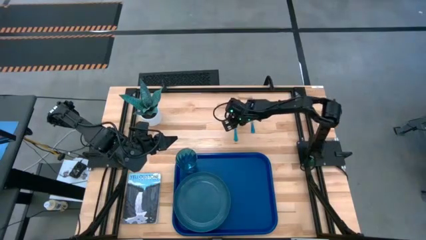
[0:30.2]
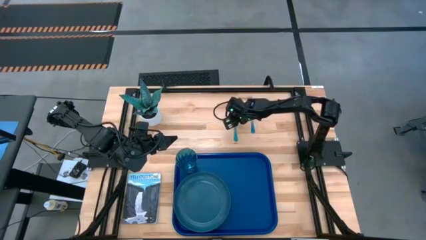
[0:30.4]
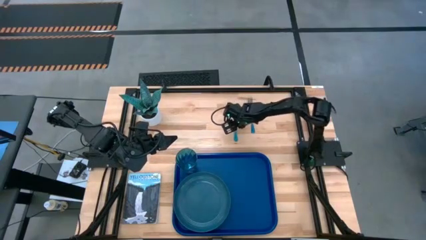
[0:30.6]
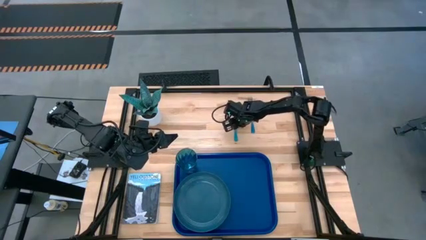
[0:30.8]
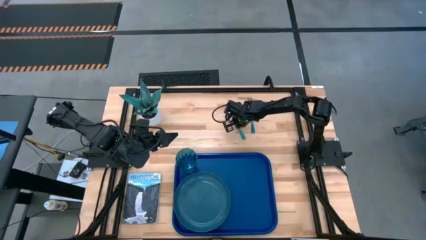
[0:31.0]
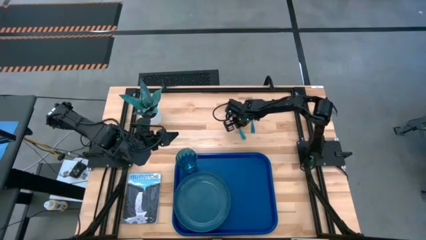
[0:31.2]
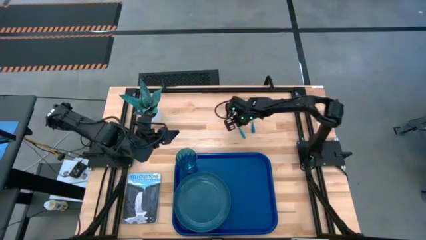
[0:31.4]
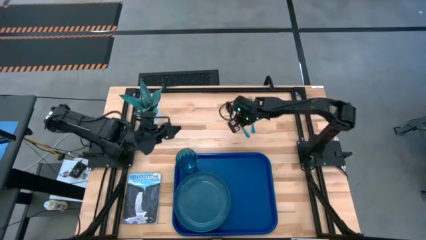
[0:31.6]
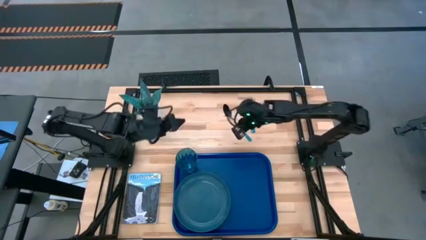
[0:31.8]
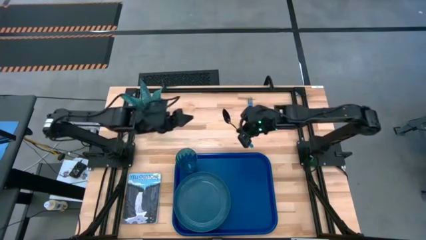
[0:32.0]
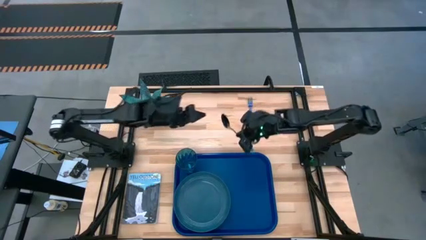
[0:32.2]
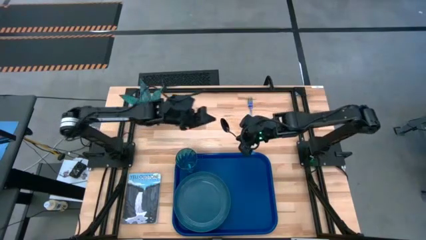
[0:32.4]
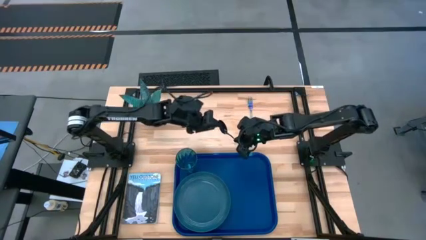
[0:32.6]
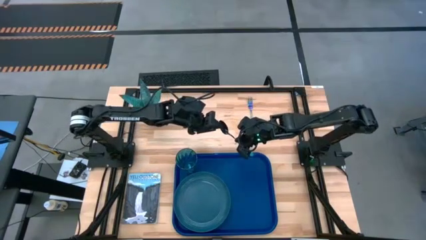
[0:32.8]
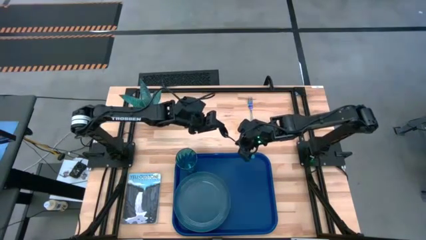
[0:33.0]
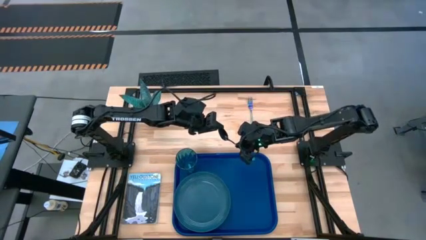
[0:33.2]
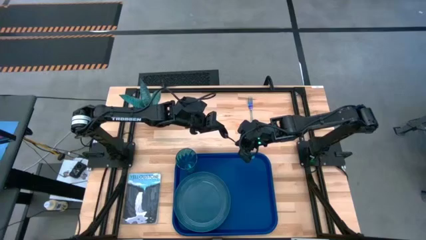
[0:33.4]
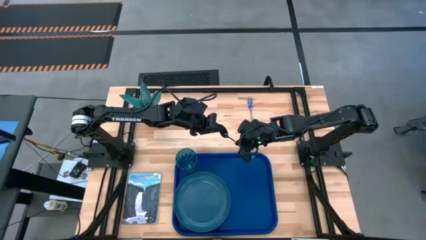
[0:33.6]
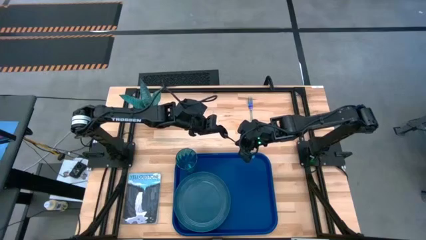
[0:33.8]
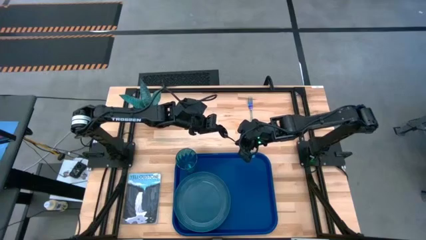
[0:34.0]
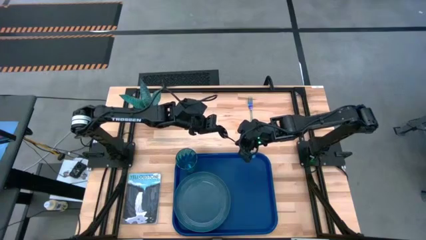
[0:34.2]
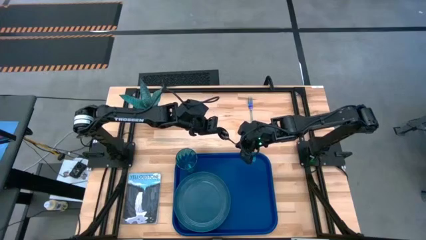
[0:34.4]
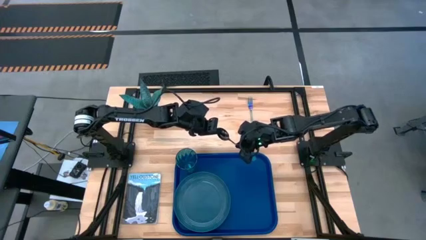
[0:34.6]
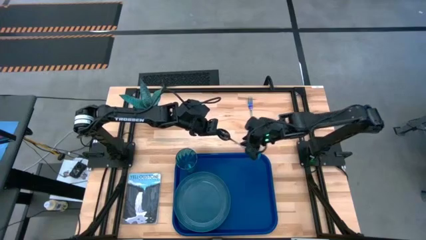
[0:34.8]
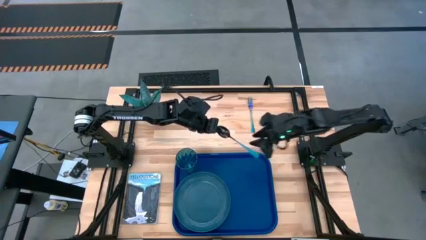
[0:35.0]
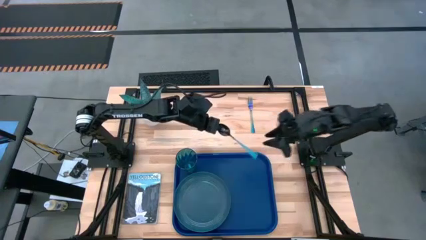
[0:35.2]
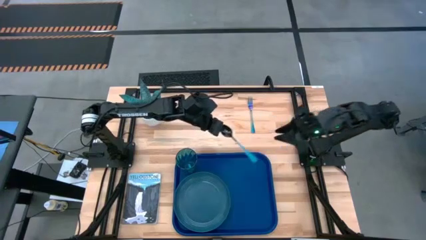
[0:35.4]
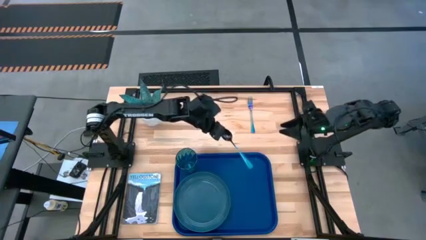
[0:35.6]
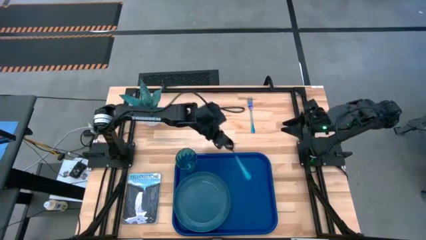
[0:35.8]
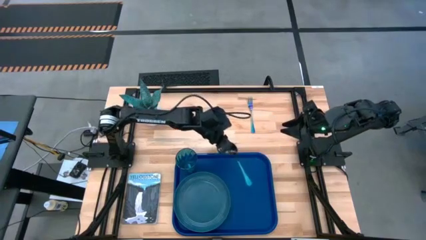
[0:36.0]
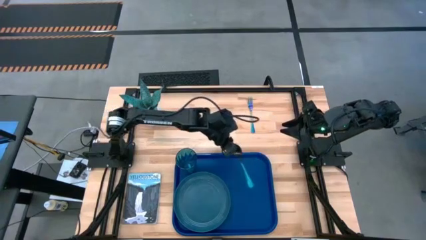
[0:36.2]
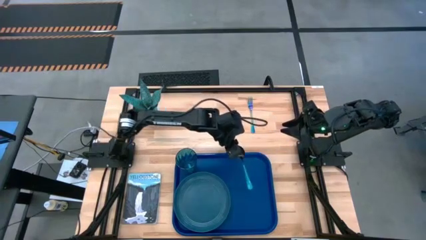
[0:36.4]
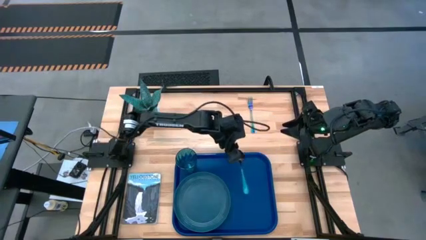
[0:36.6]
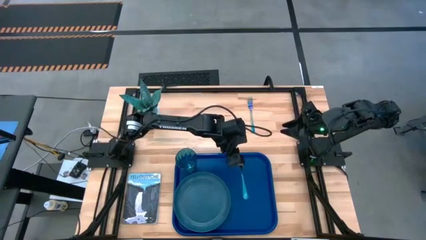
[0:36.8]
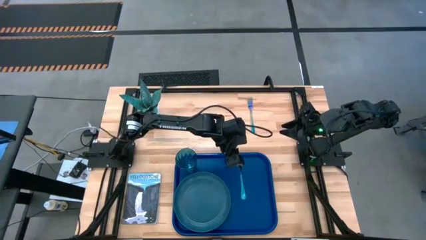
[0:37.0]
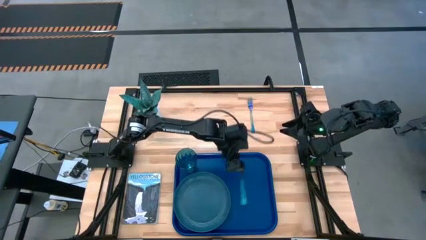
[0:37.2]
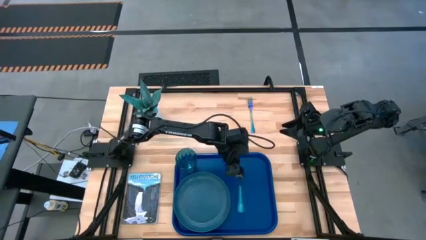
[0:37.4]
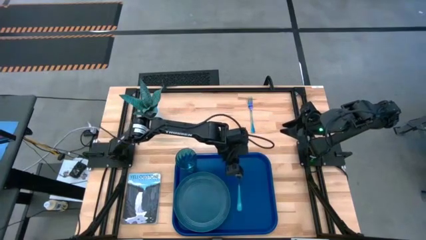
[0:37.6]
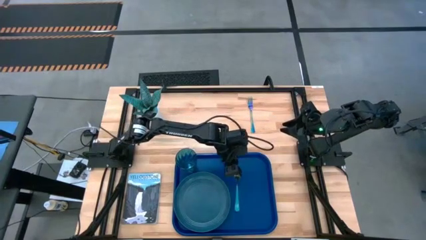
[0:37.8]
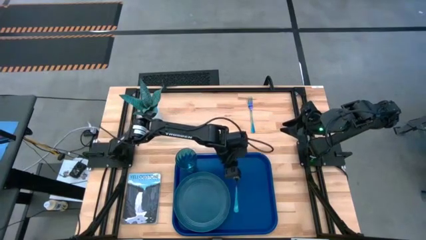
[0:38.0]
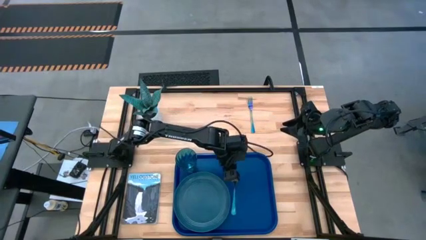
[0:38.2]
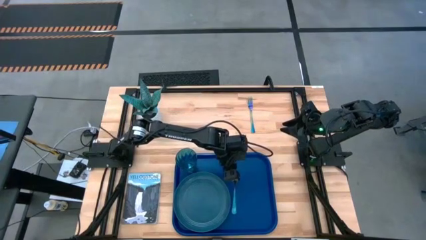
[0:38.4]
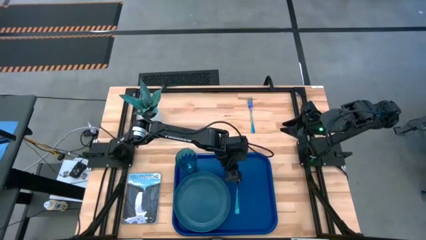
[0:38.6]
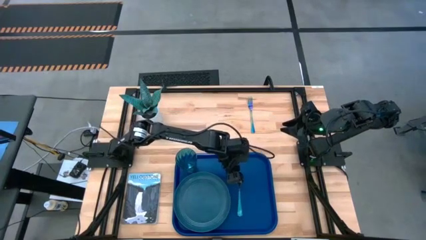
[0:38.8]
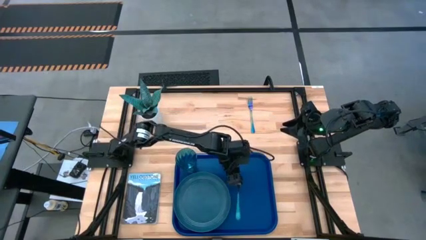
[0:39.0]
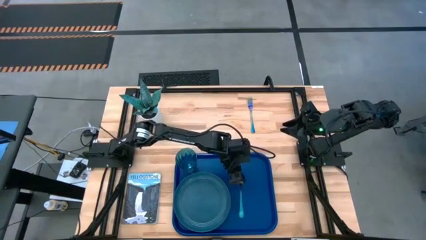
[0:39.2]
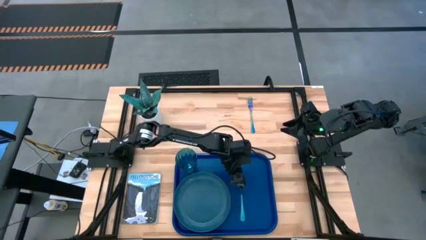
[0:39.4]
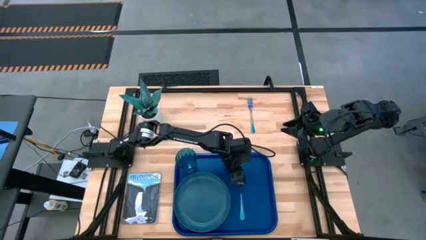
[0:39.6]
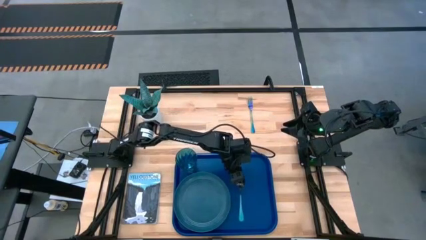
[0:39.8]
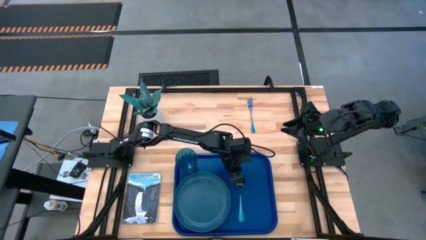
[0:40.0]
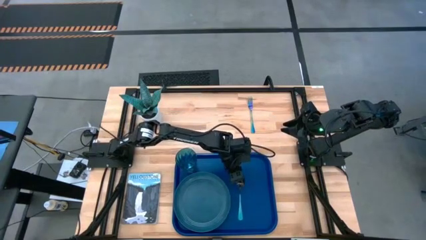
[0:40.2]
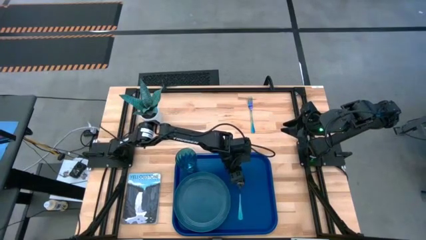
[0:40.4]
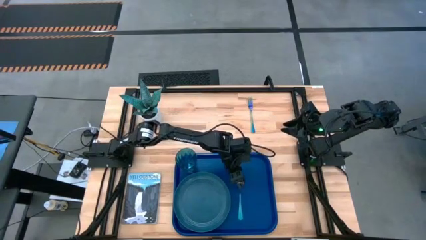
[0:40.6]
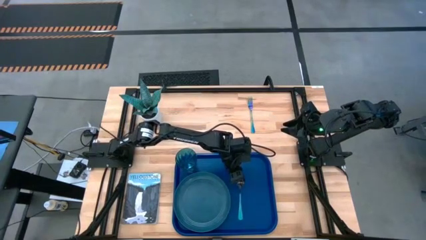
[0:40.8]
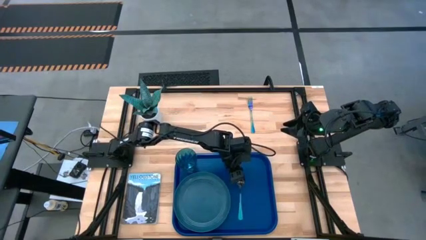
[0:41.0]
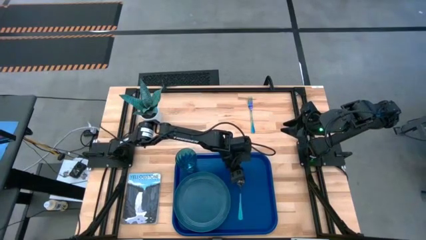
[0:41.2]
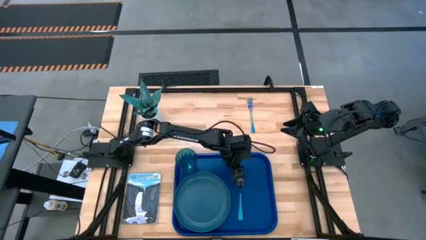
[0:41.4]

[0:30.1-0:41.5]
Task: Pick and place plate/cup/fork/spoon on tray
Put the blue spoon on the blue serving tray to the right of the dark blue plate
